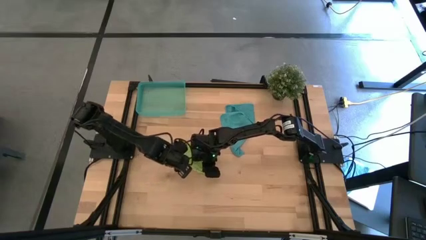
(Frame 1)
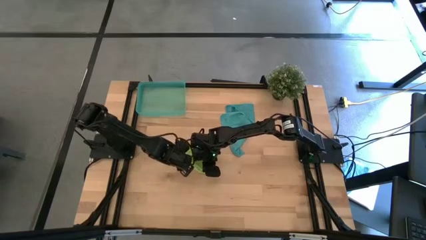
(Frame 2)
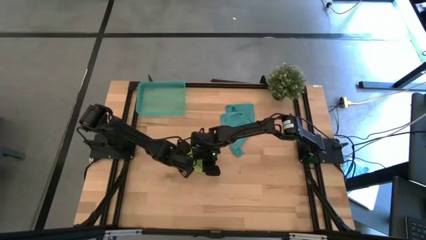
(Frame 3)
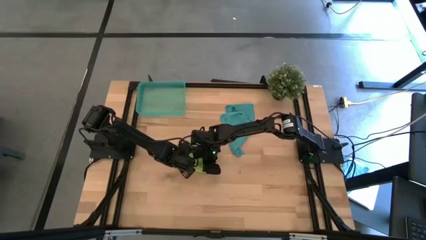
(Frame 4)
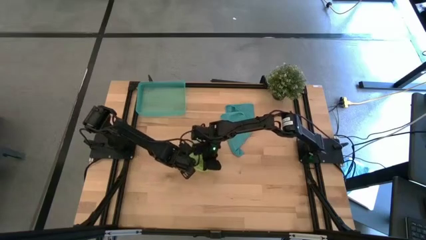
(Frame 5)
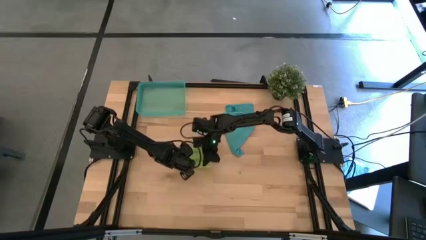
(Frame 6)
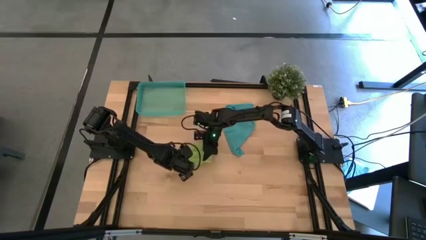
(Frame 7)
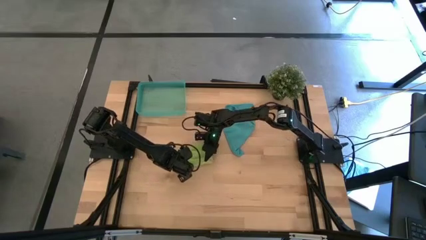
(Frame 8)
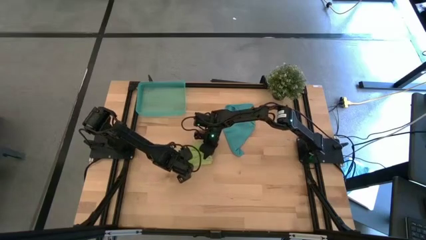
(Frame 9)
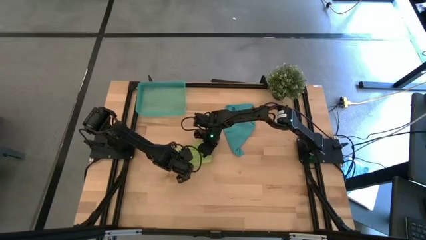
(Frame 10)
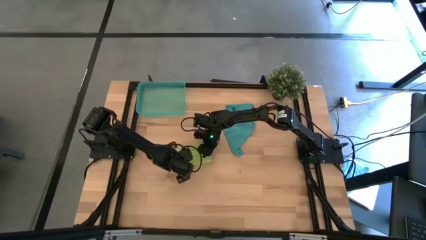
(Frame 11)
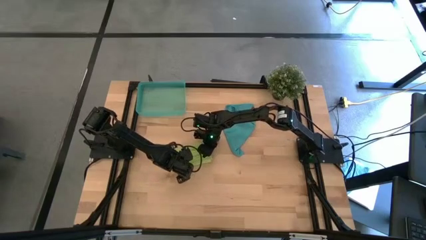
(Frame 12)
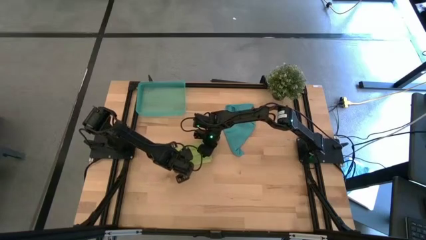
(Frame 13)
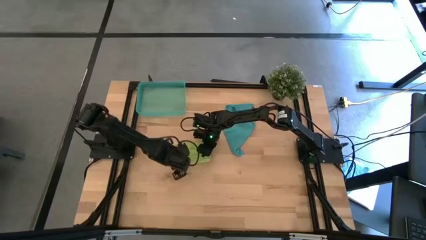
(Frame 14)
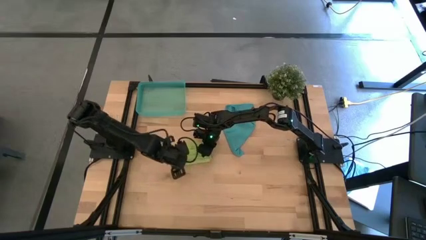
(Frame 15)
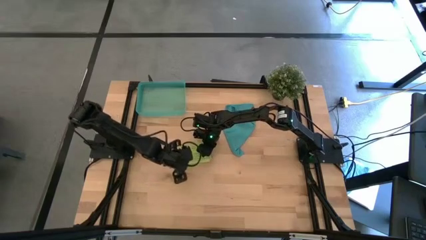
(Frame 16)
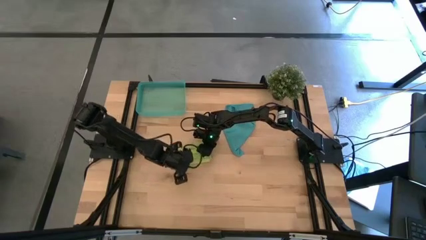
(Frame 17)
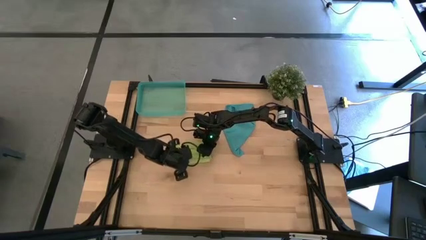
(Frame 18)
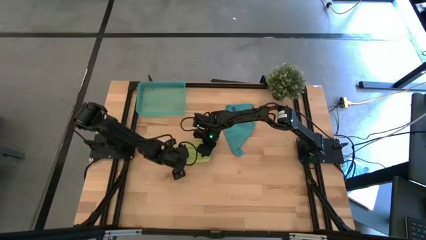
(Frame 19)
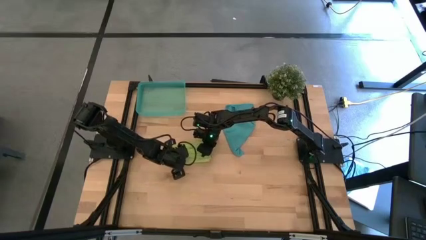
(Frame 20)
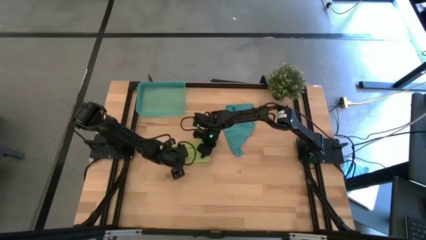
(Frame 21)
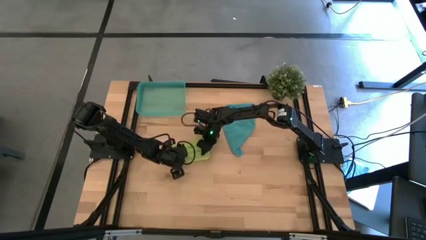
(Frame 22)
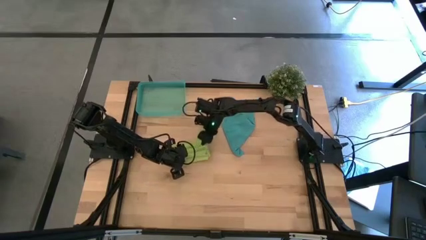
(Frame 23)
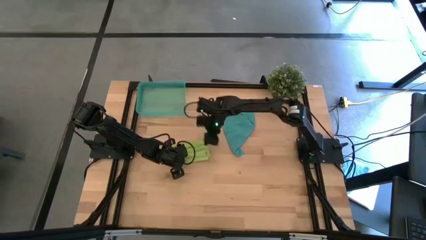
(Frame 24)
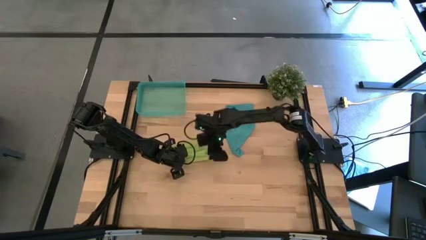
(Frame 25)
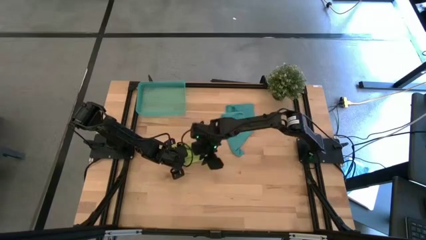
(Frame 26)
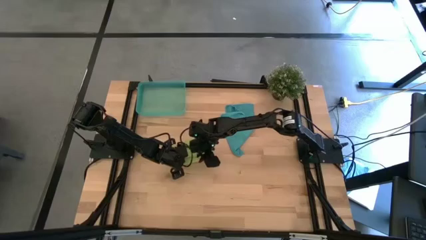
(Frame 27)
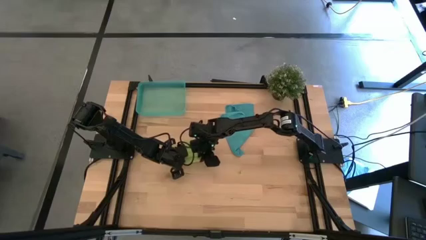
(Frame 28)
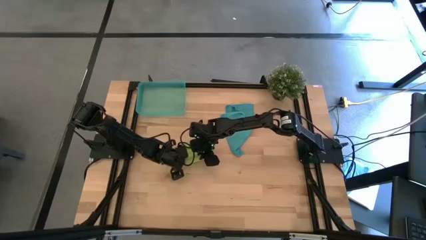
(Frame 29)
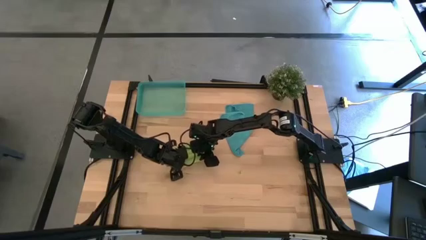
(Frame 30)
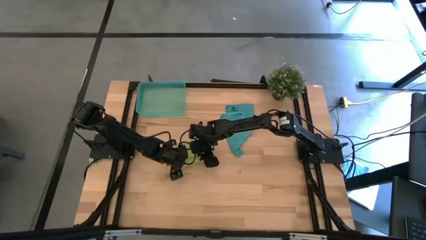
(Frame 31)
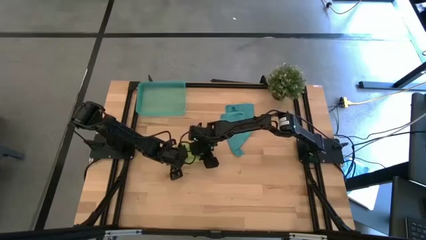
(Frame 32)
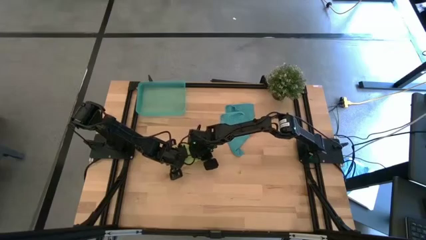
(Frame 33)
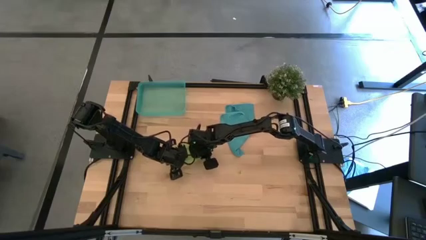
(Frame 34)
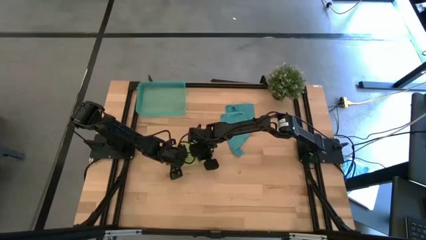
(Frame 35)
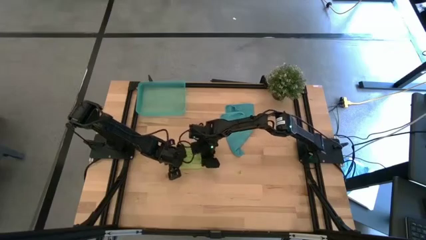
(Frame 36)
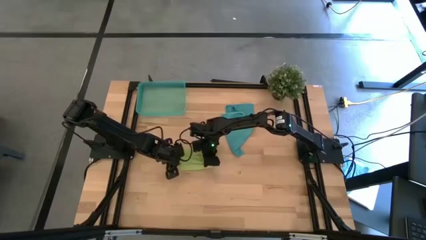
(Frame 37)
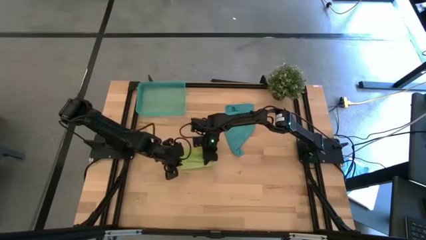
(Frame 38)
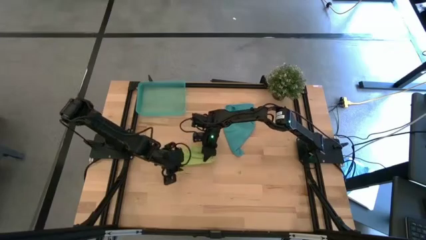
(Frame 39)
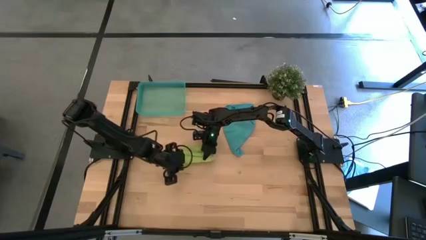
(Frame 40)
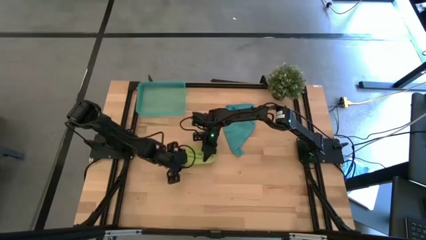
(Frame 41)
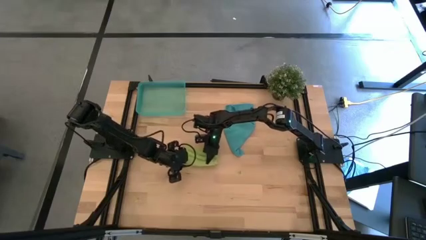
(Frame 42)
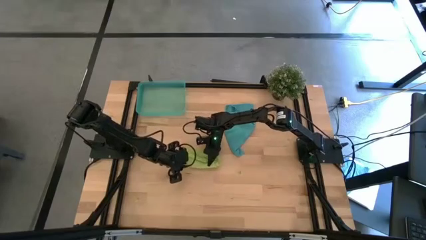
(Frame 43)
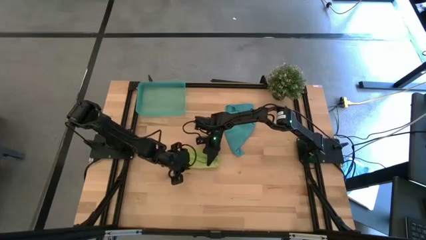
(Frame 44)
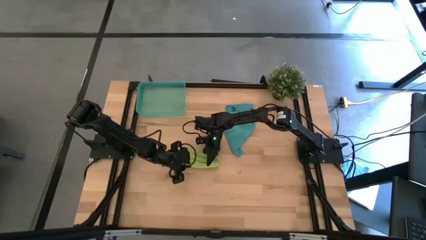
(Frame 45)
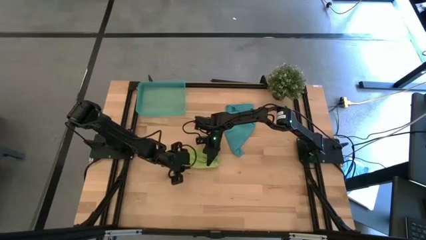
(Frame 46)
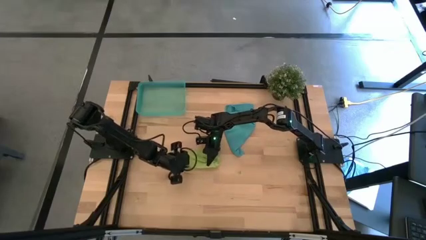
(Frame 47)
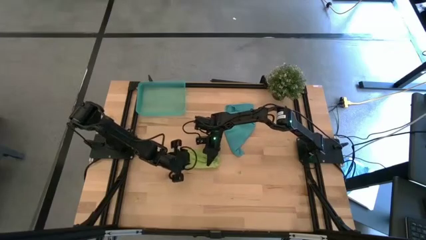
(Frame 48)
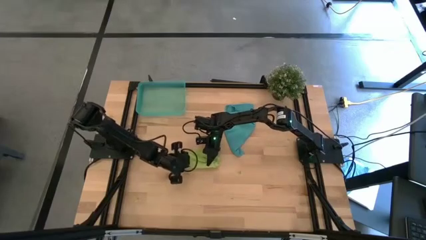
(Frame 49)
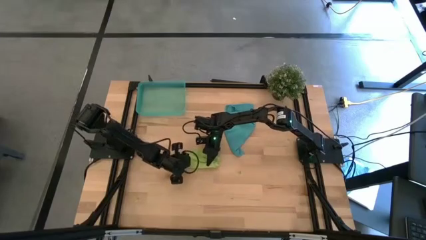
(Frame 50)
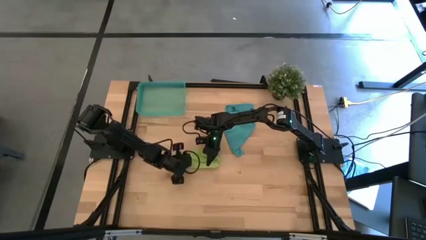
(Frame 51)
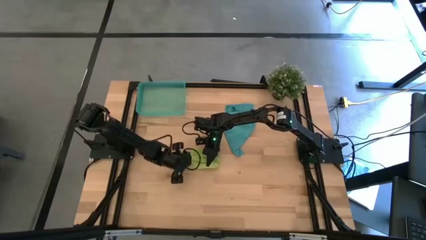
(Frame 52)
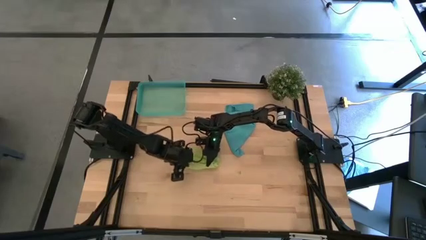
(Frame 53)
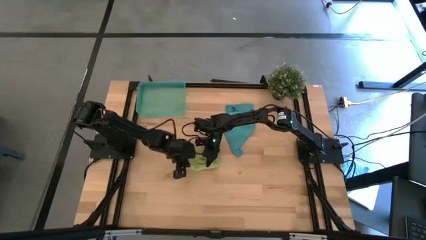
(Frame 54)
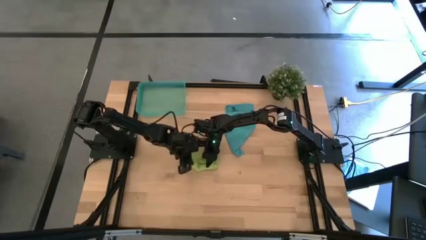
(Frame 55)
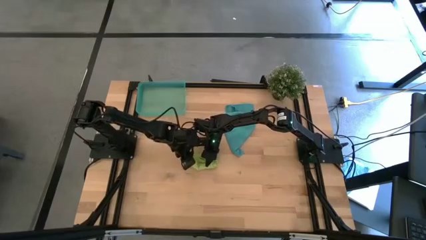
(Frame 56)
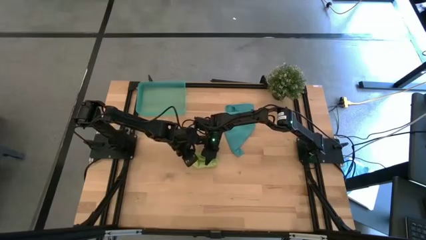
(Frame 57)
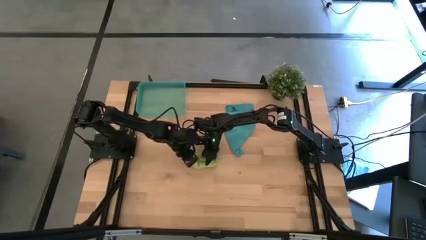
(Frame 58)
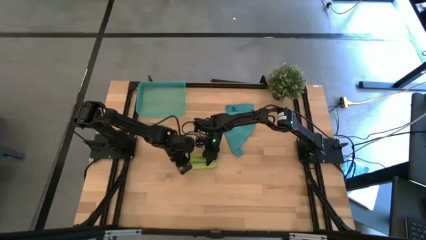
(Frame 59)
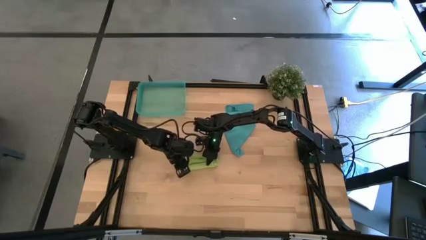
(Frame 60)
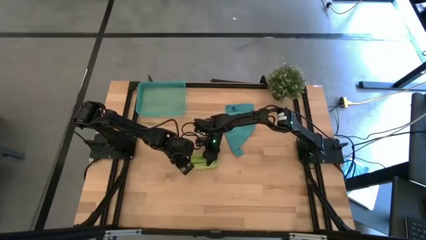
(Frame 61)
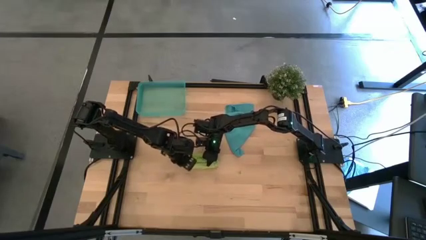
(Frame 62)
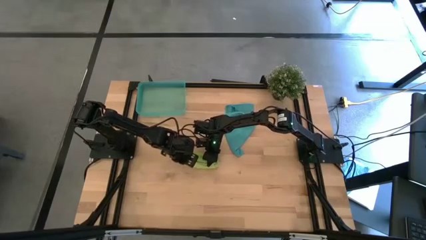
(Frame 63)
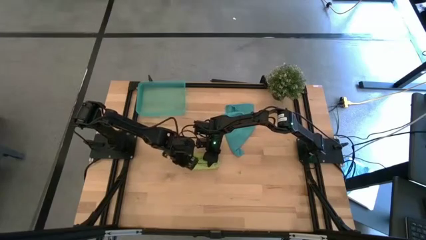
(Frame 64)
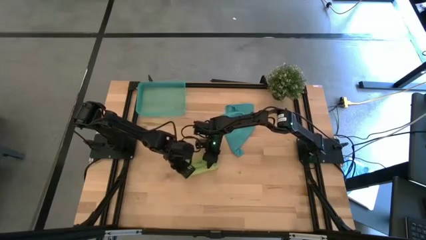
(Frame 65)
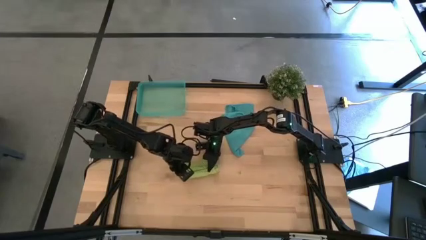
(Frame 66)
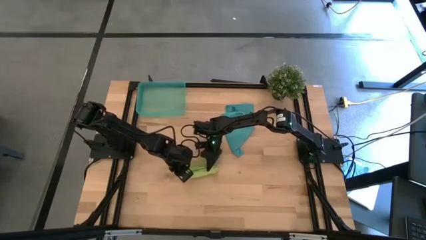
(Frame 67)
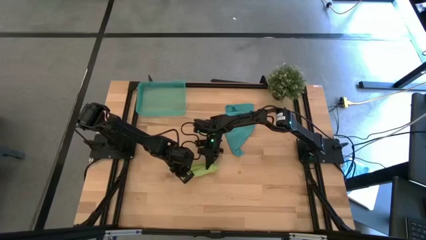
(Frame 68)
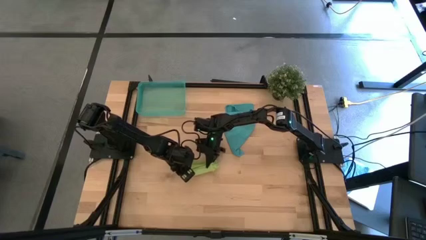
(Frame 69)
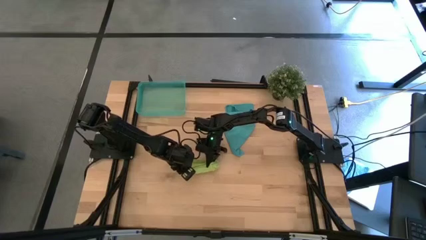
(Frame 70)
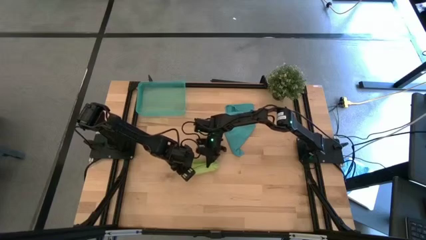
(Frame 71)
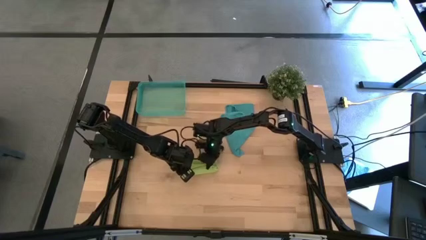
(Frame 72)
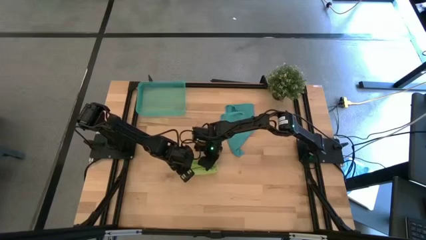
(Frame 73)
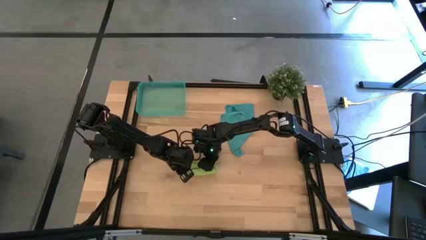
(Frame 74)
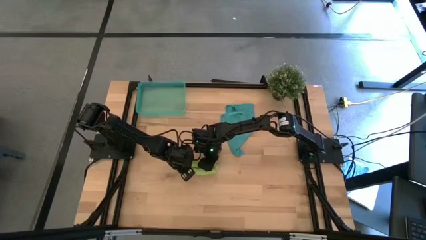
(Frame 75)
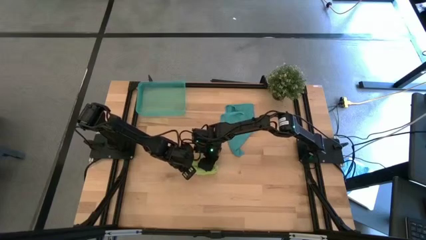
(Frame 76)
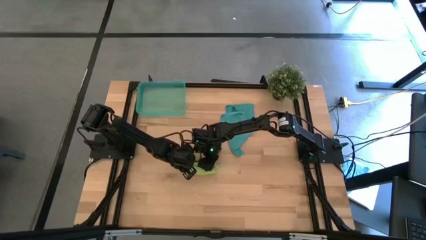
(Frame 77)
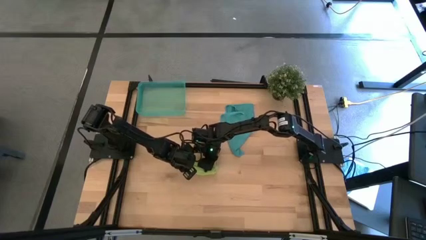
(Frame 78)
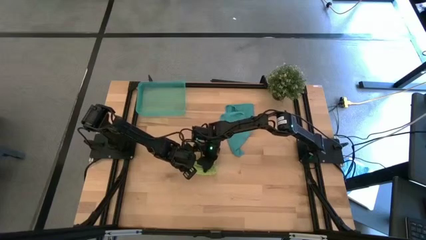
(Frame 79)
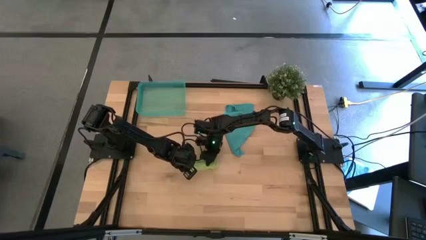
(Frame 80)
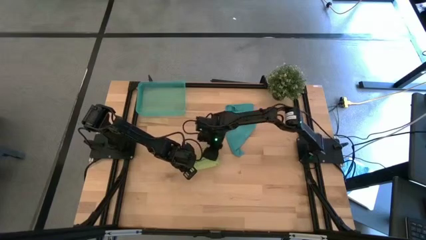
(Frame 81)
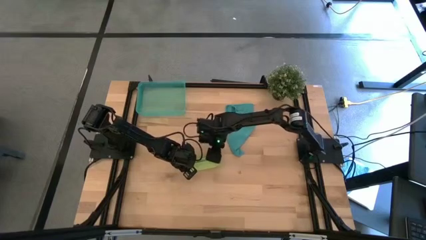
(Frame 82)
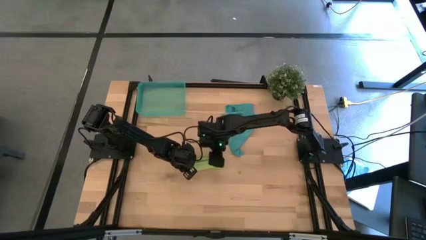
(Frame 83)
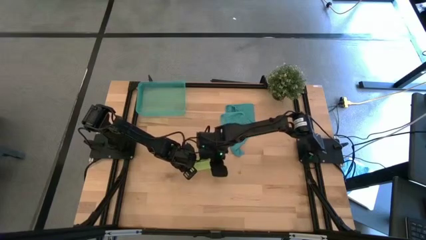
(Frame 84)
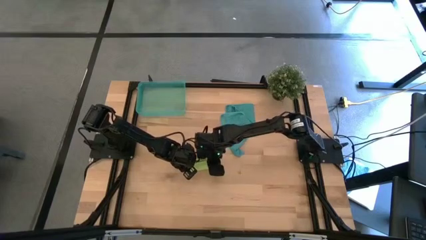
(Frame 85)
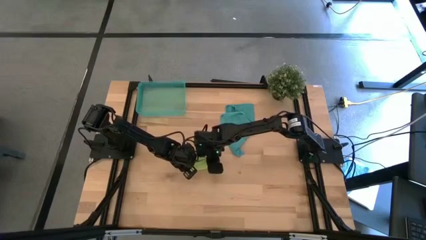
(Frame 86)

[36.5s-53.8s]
Task: Roll microfiber towels into tight, uniform cylinder then place into a basket
Roll the green microfiber cloth
